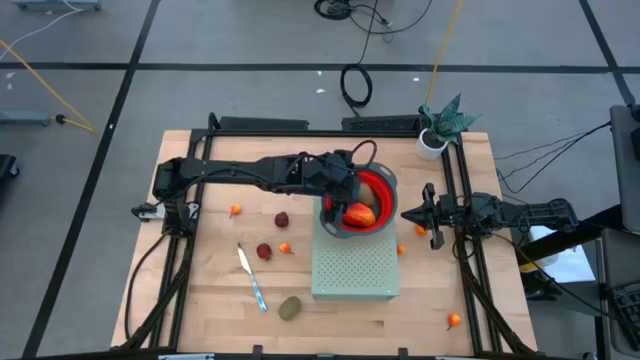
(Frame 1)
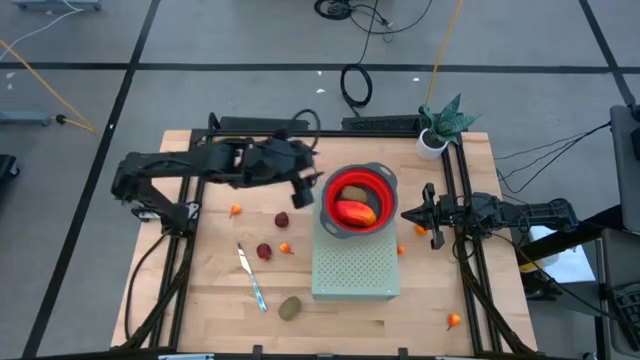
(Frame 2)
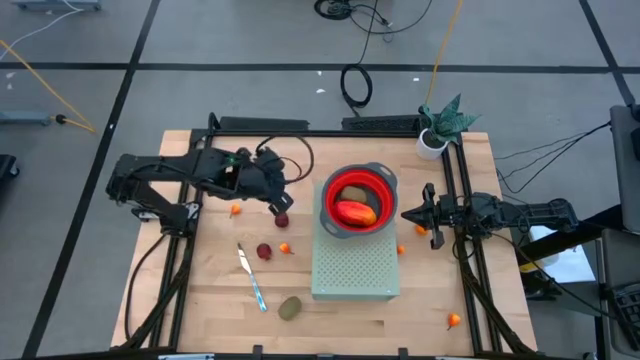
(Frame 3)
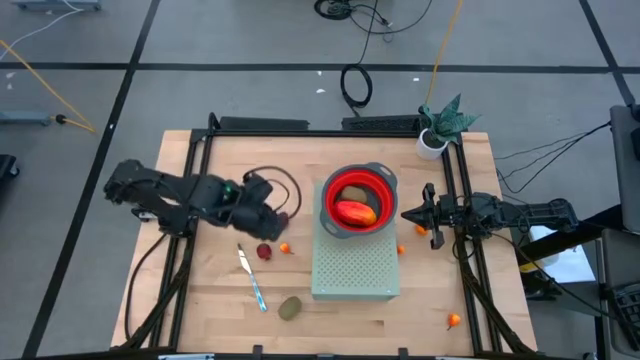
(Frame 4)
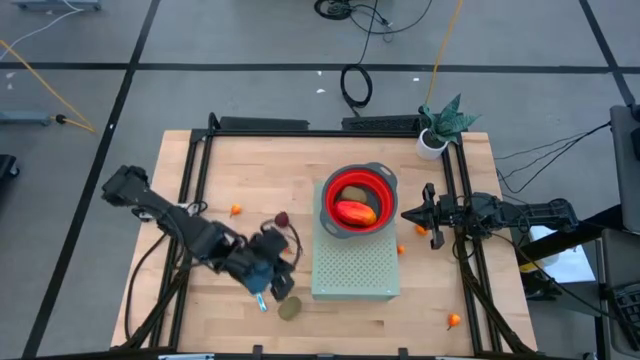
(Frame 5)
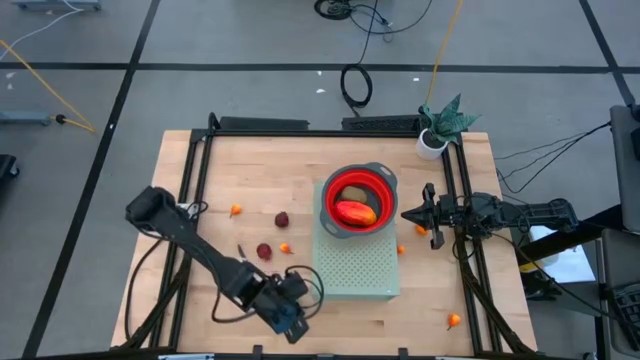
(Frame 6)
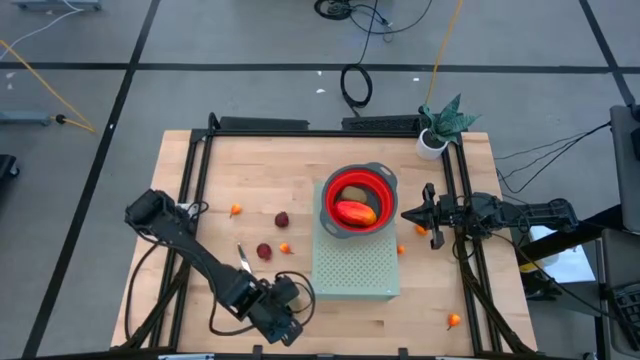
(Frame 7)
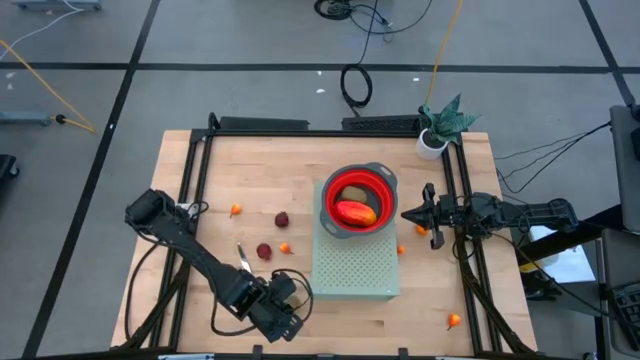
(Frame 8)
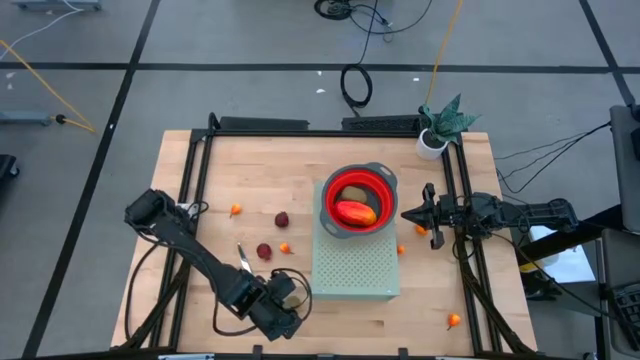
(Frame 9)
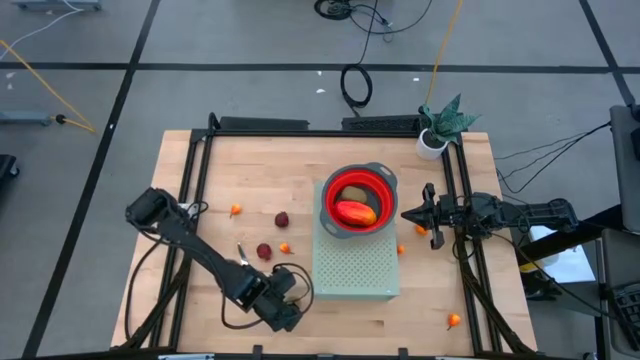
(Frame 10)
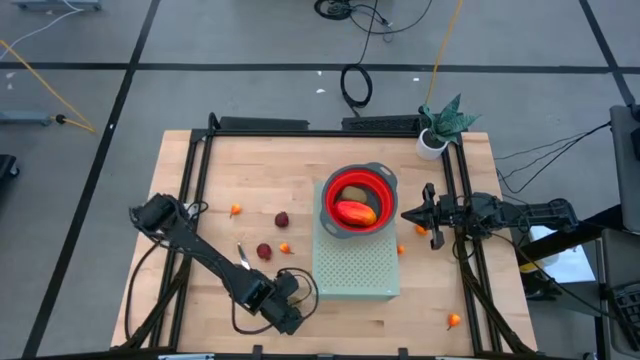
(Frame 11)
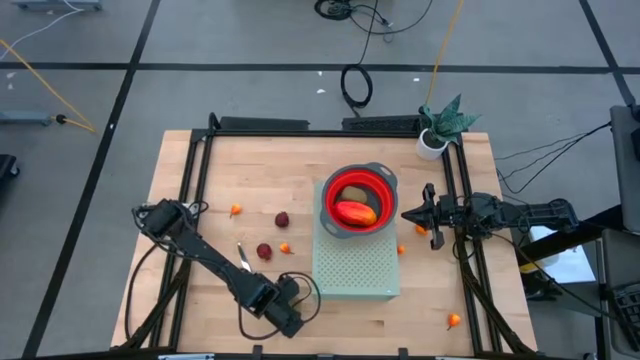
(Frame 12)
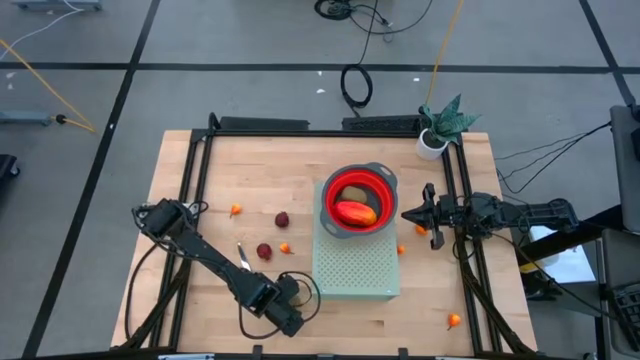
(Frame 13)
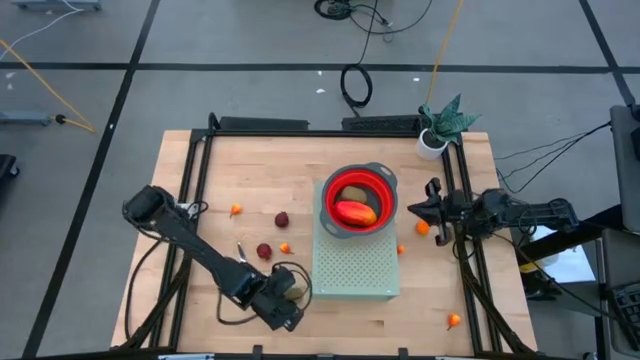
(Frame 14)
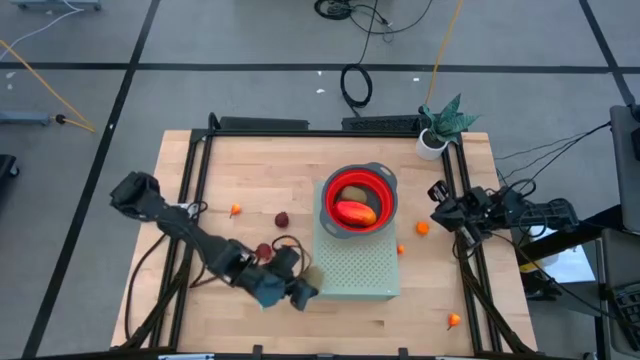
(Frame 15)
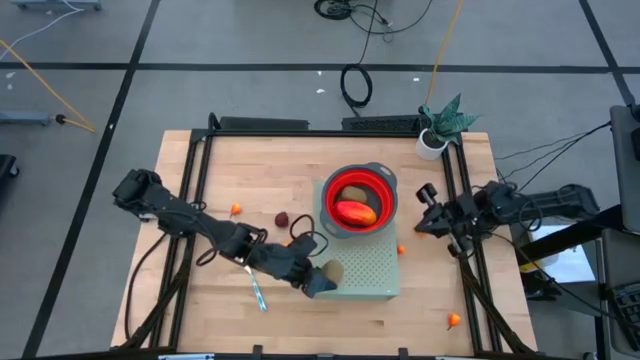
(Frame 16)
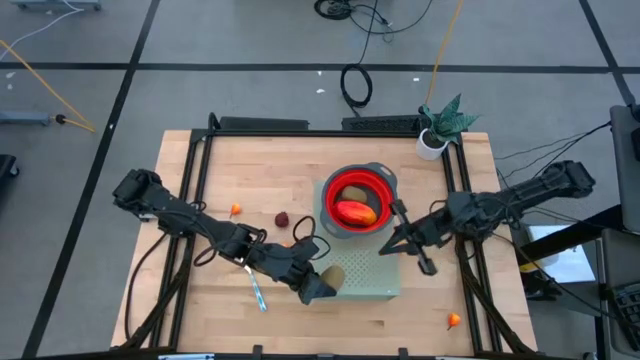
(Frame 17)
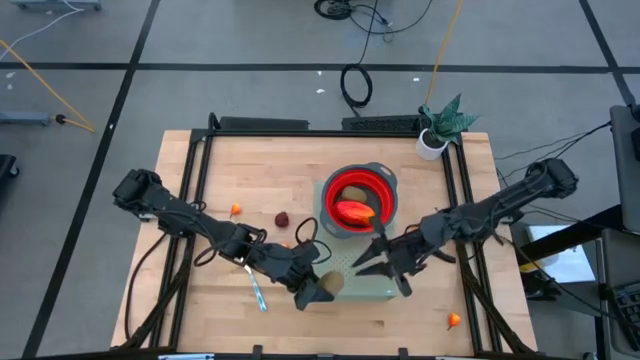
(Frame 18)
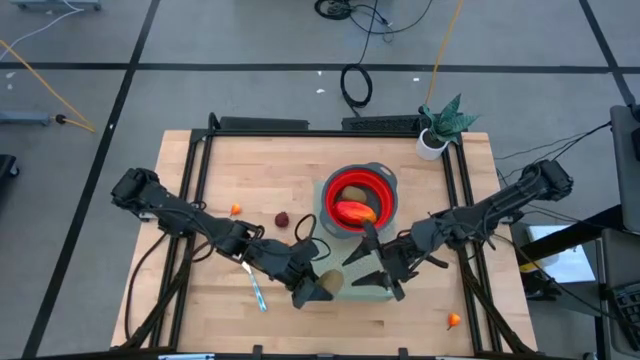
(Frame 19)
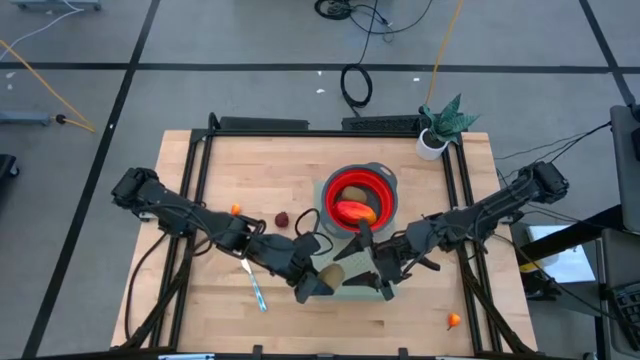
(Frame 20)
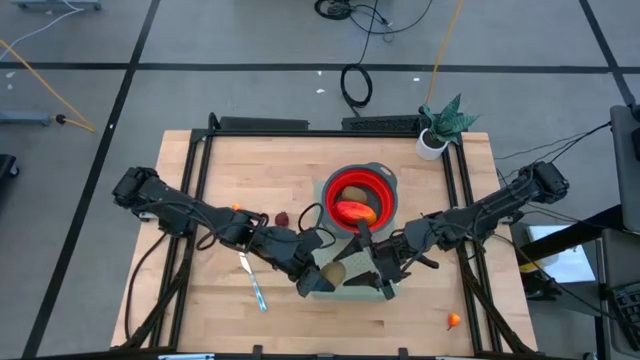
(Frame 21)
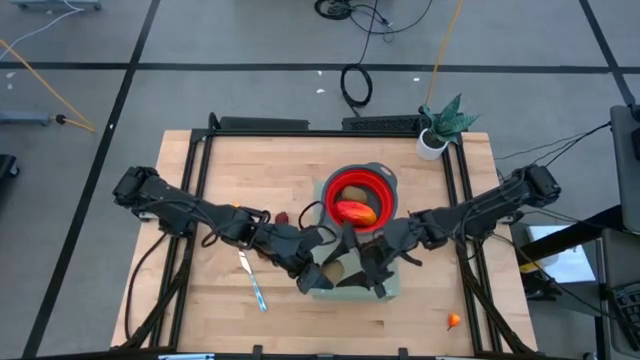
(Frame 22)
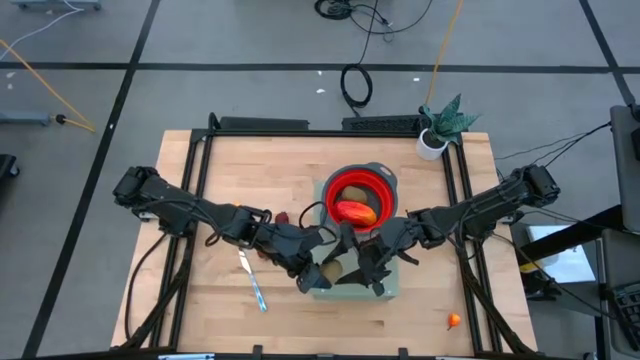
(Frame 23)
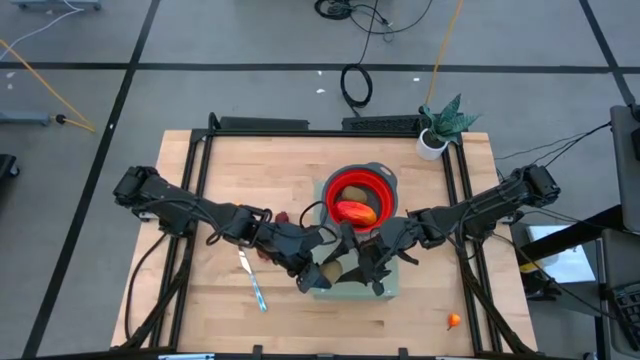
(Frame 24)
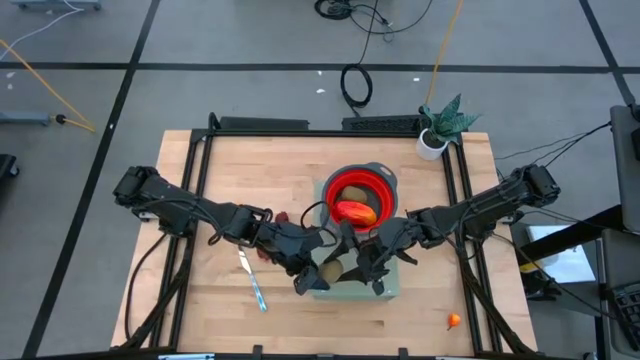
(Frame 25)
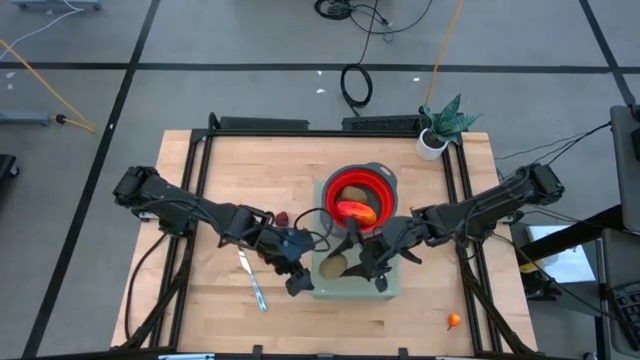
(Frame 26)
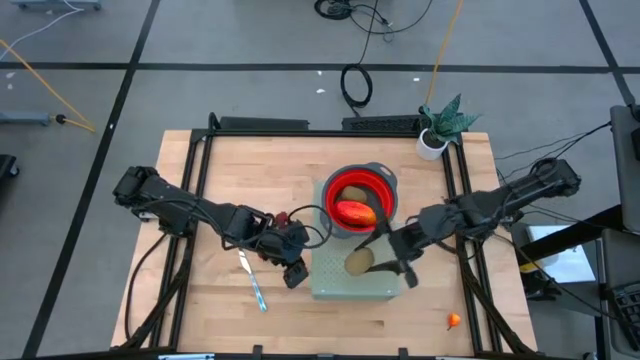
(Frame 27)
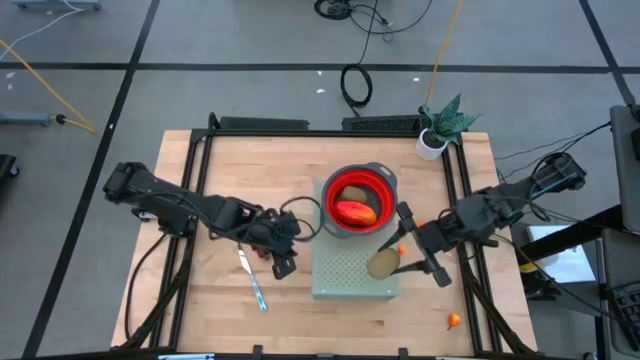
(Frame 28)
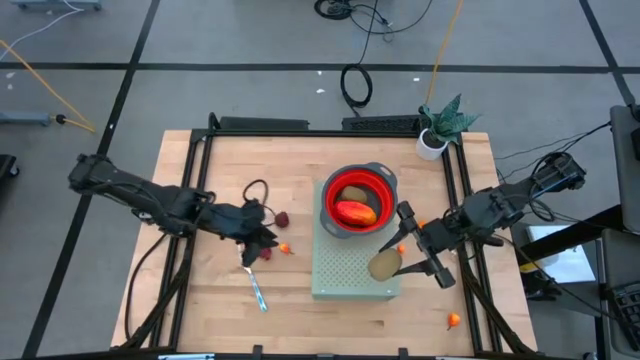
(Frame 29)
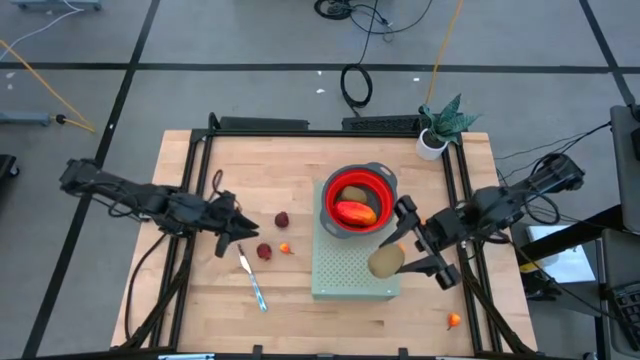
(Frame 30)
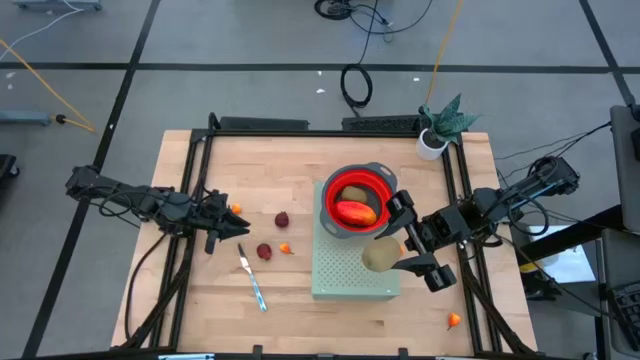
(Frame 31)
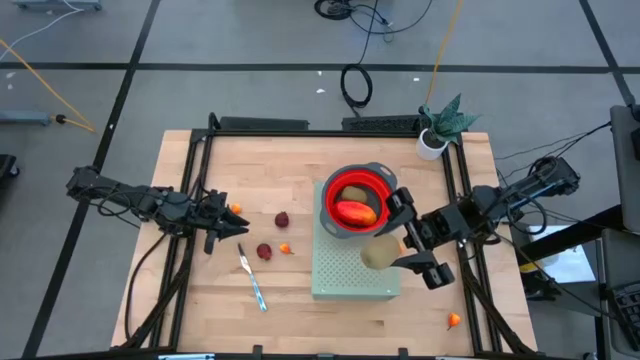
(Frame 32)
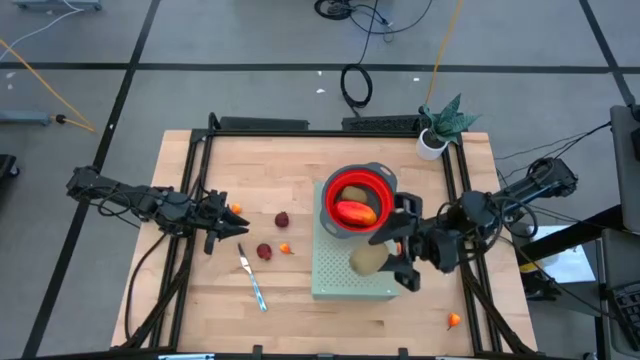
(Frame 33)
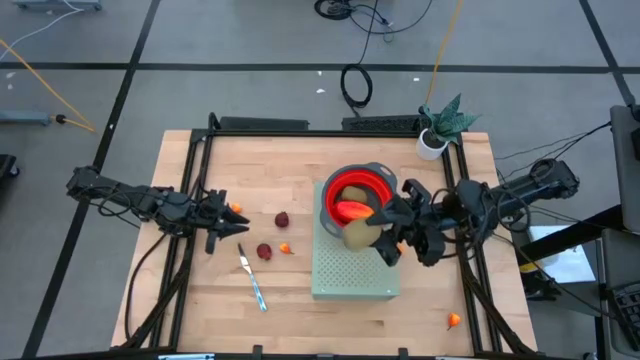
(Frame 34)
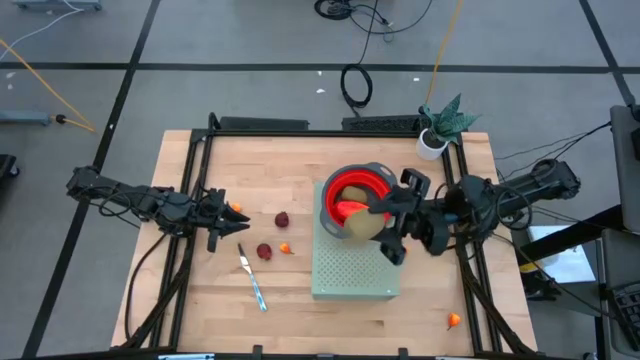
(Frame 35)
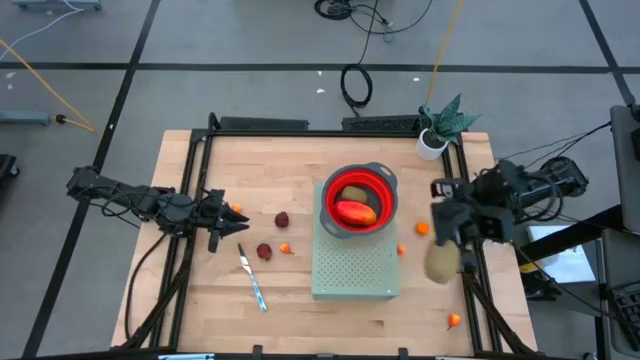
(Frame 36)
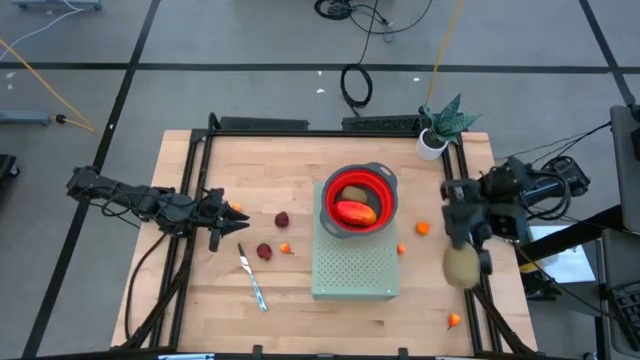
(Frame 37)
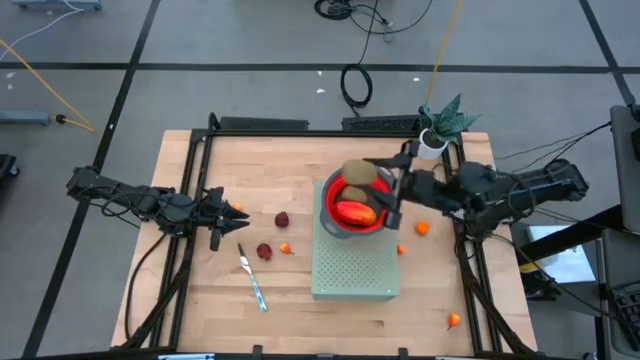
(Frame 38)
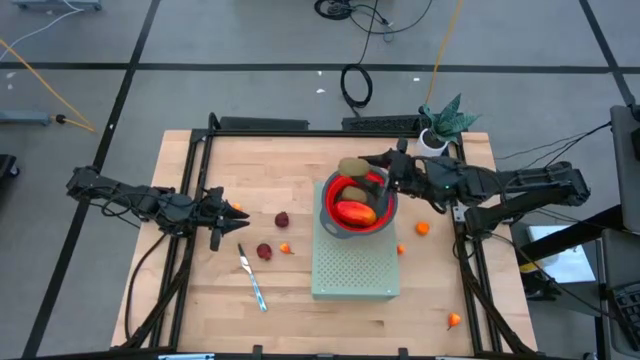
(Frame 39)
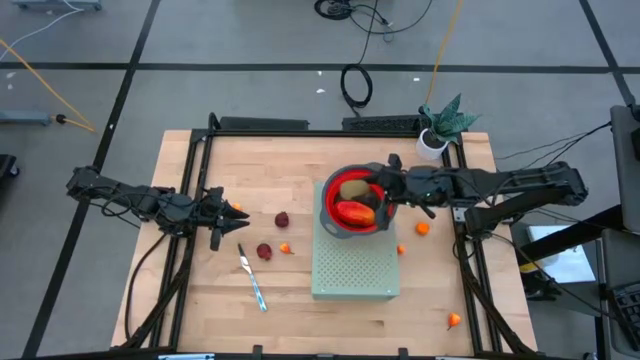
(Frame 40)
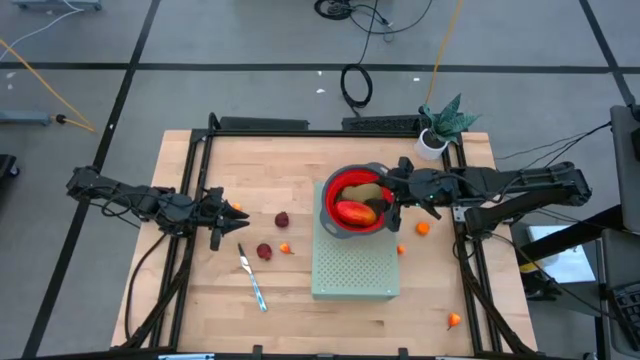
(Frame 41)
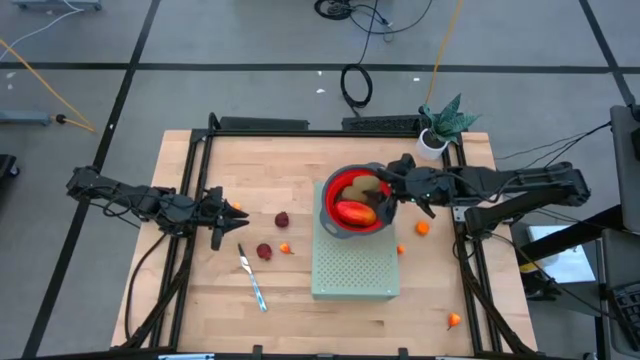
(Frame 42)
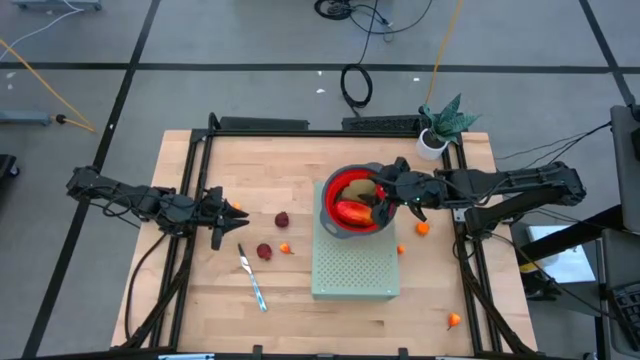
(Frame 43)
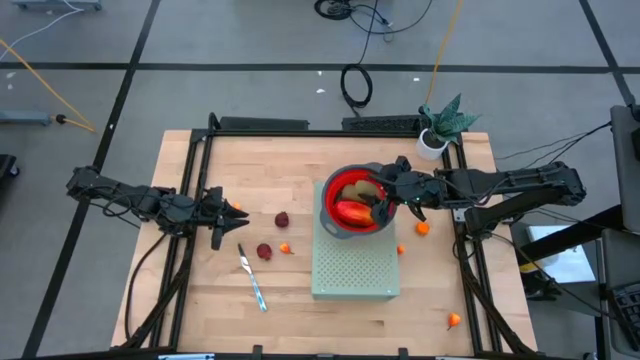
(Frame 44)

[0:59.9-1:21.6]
Task: Pick & Place Fruit
Put the kiwi into the red strainer bowl on the shelf
